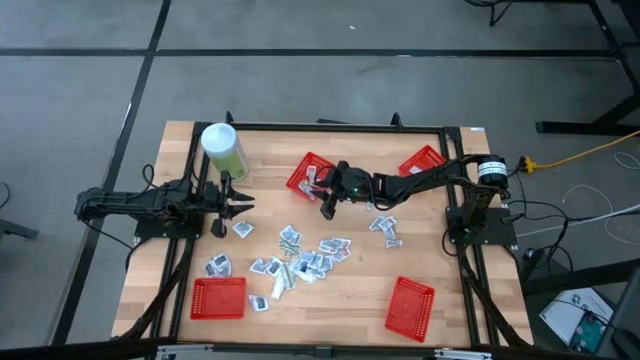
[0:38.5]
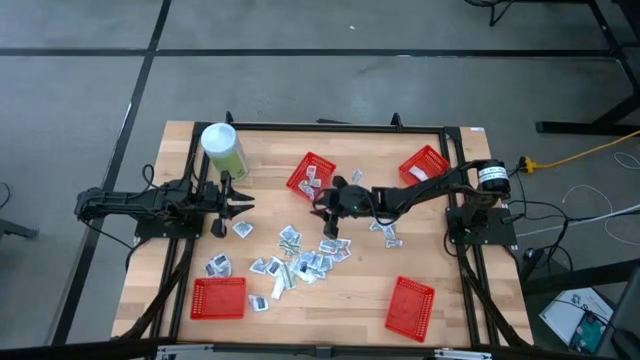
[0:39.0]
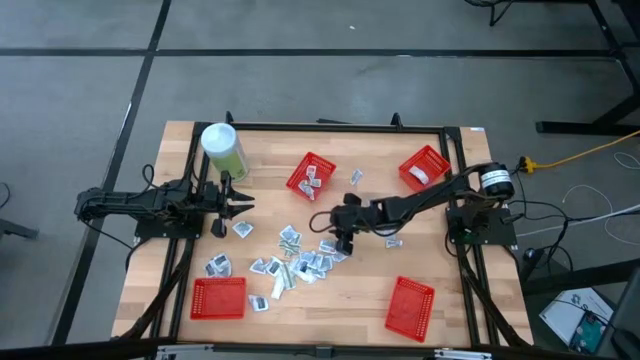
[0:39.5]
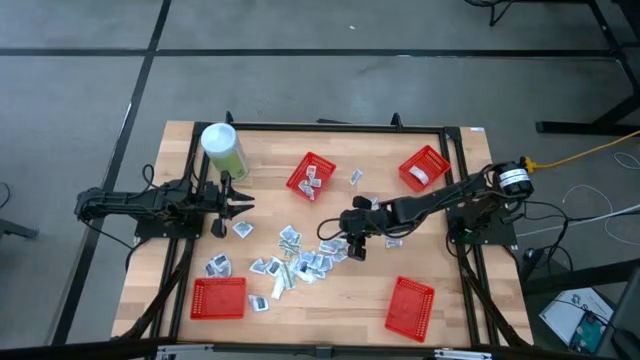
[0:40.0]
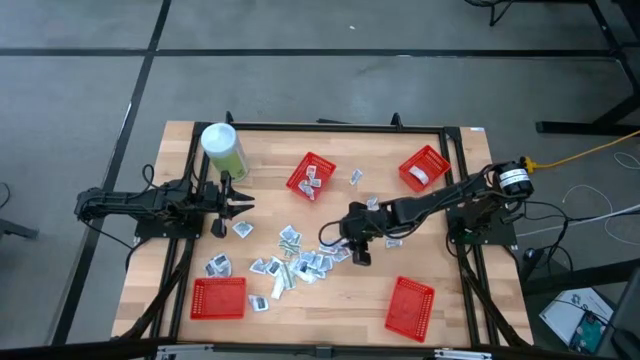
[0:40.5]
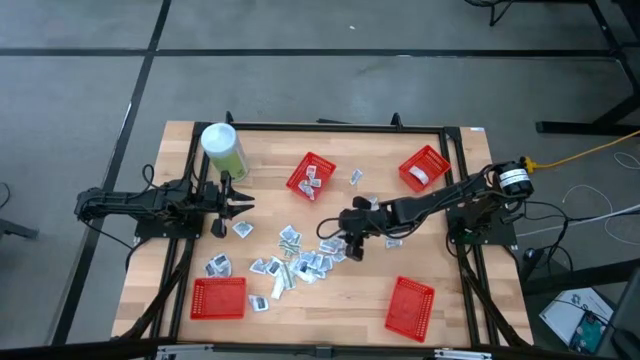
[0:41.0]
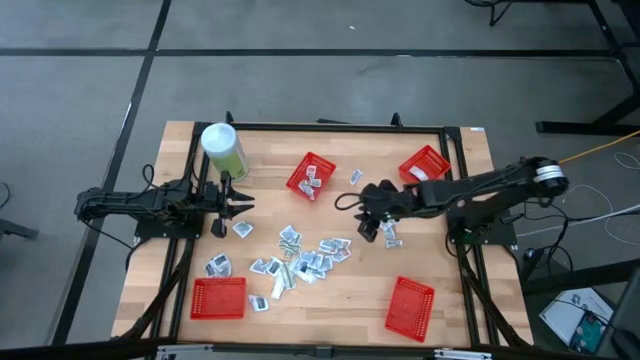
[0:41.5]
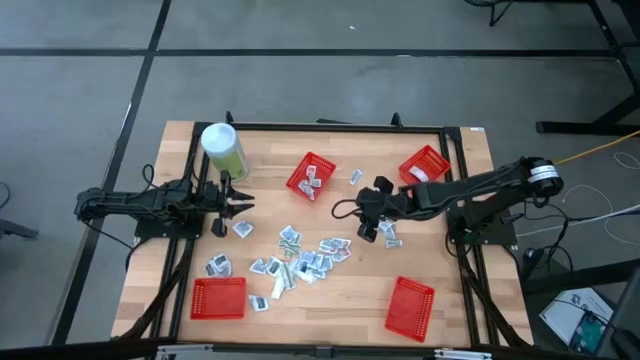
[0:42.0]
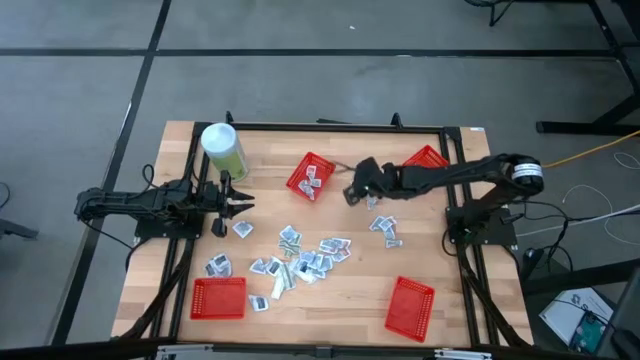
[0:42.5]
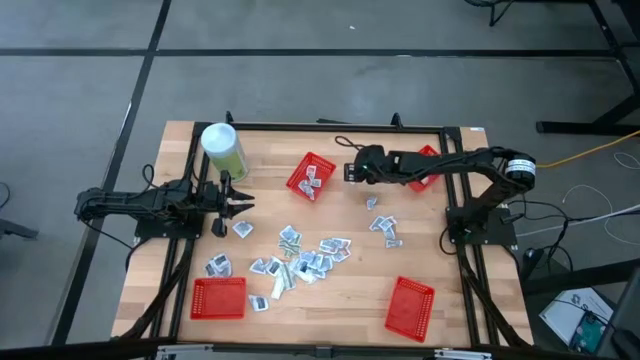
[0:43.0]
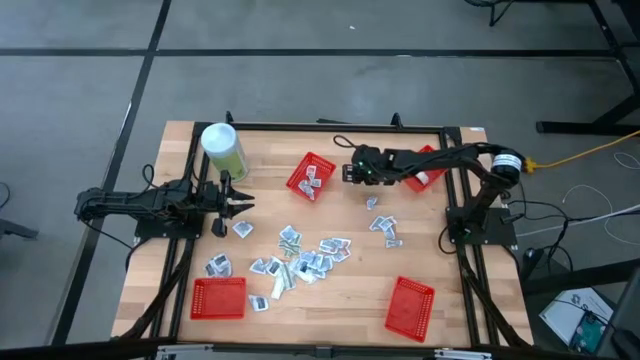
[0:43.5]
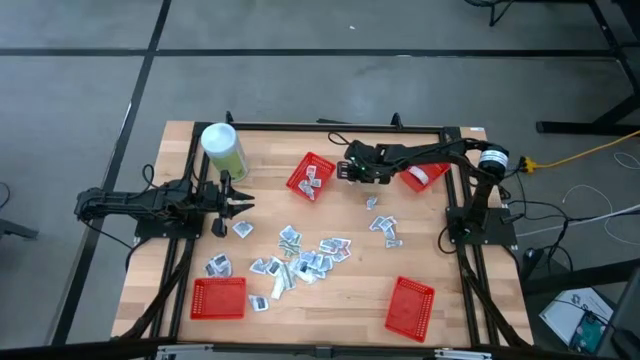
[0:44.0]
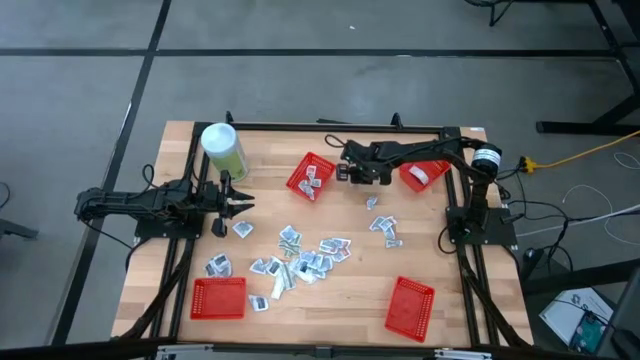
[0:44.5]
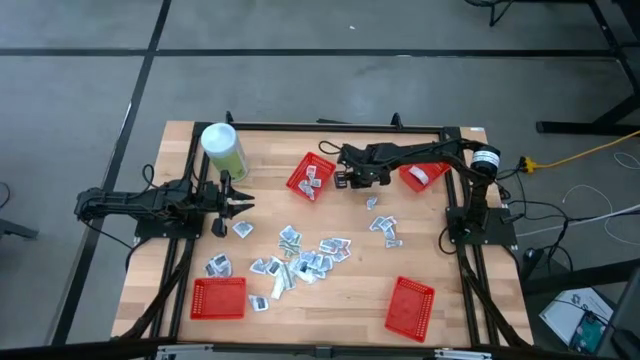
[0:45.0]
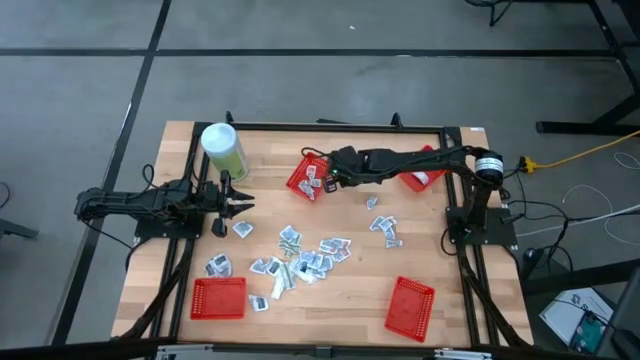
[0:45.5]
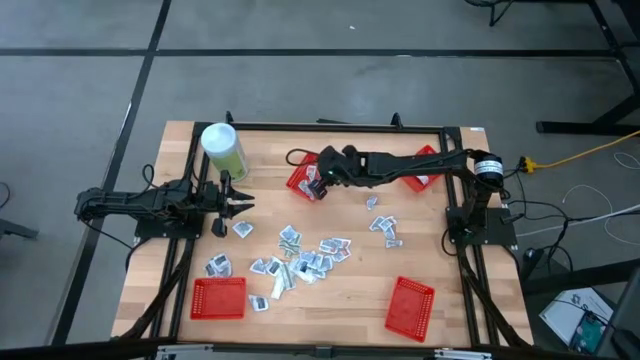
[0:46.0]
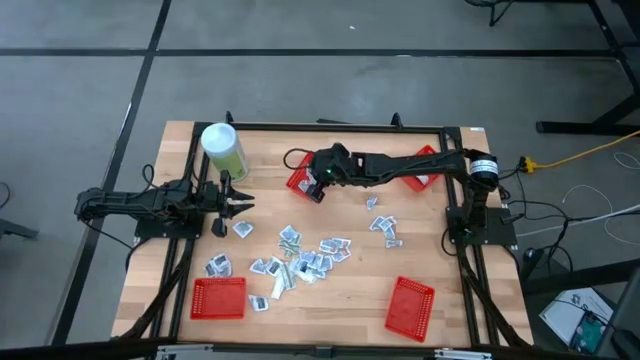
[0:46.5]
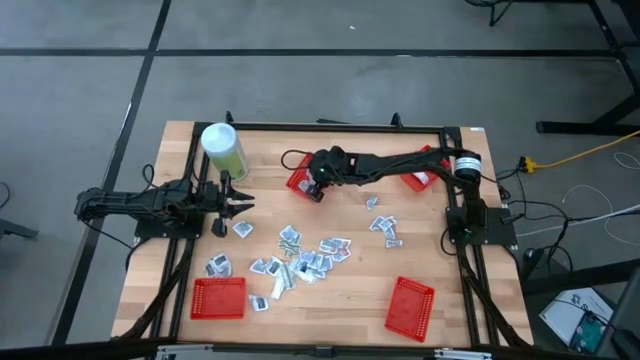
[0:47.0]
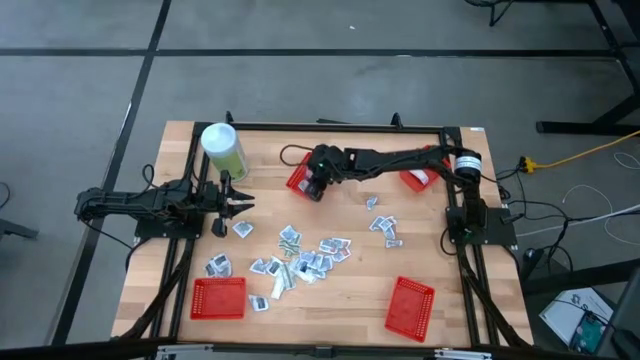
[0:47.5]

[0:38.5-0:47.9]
Task: Pick & Place First Aid Supplies
Put the orange ointment pack into the red container

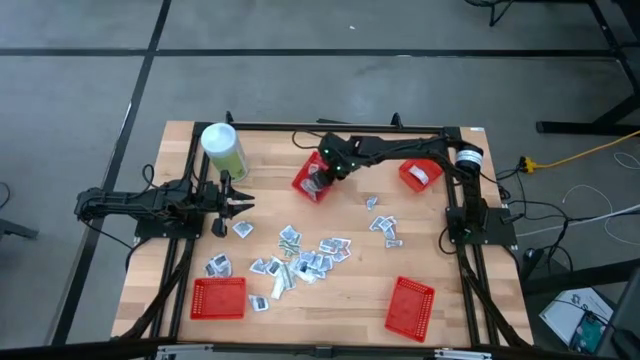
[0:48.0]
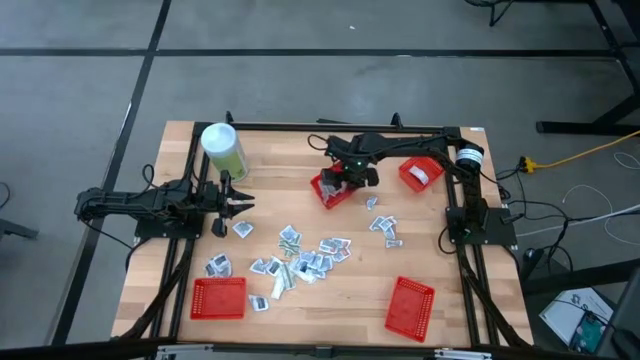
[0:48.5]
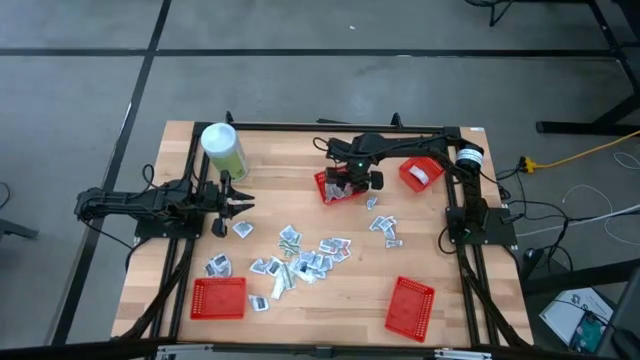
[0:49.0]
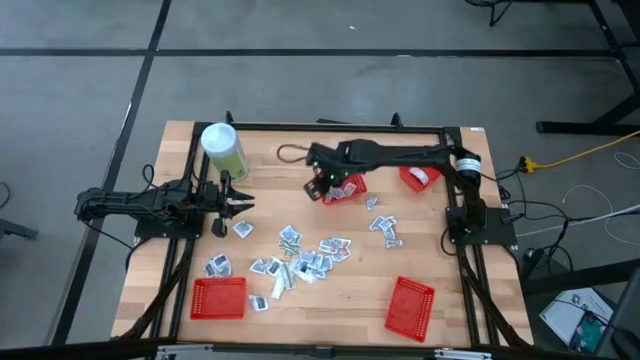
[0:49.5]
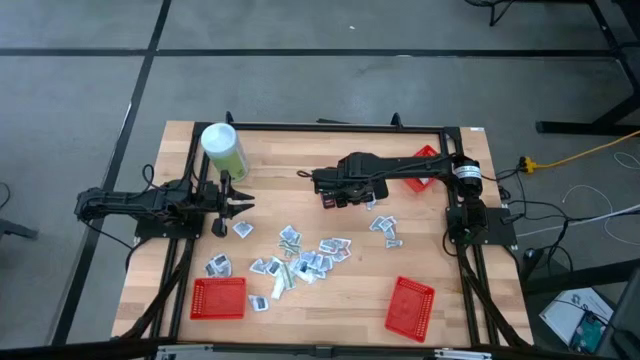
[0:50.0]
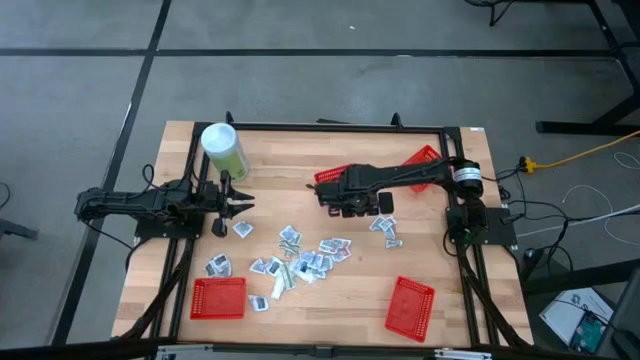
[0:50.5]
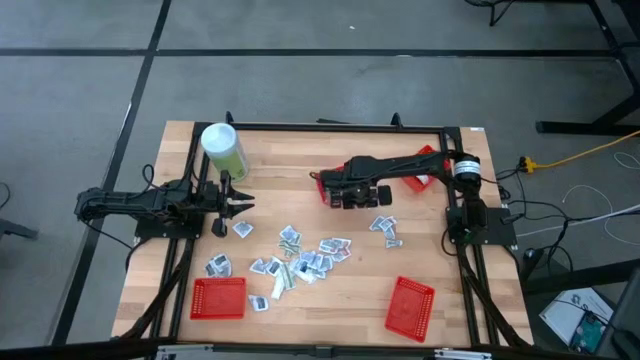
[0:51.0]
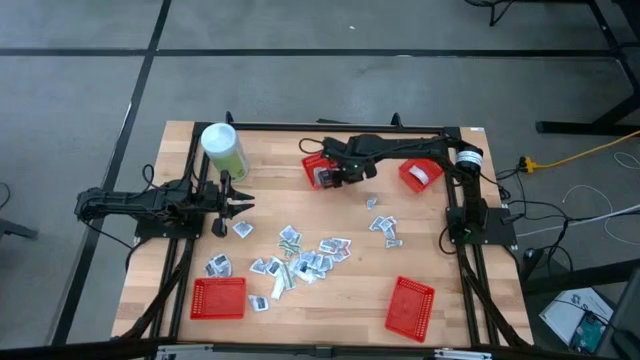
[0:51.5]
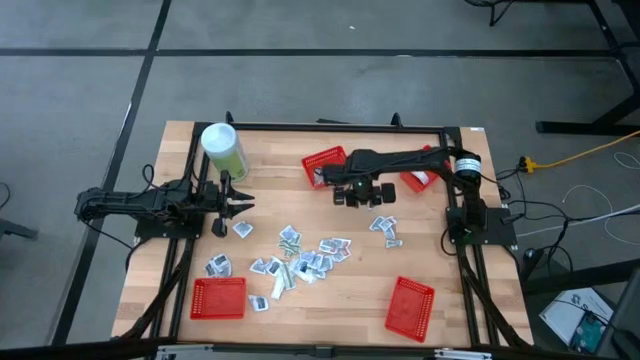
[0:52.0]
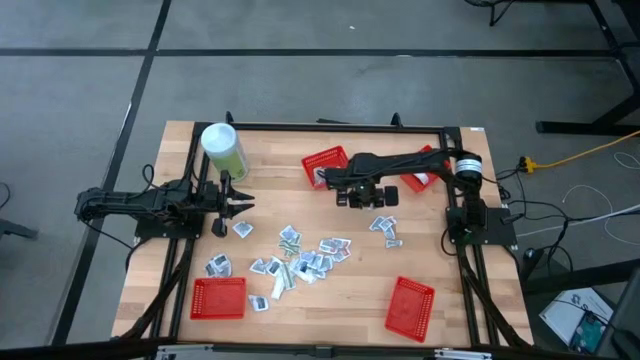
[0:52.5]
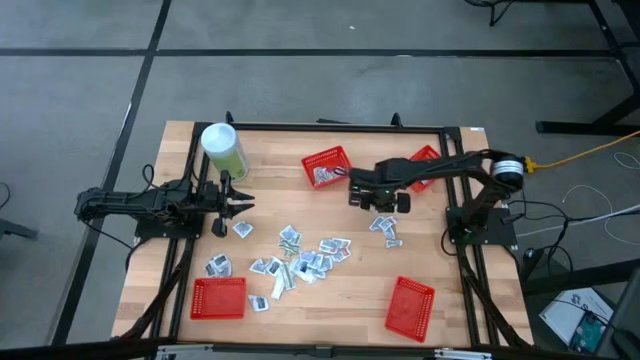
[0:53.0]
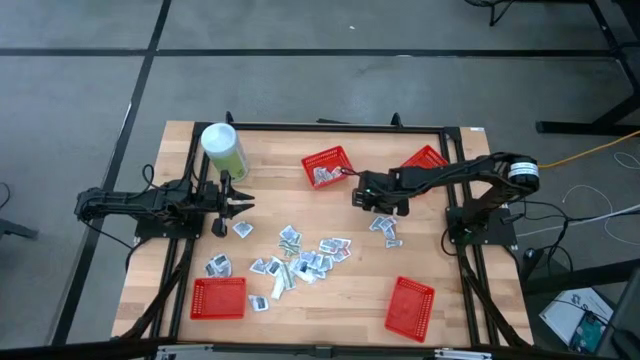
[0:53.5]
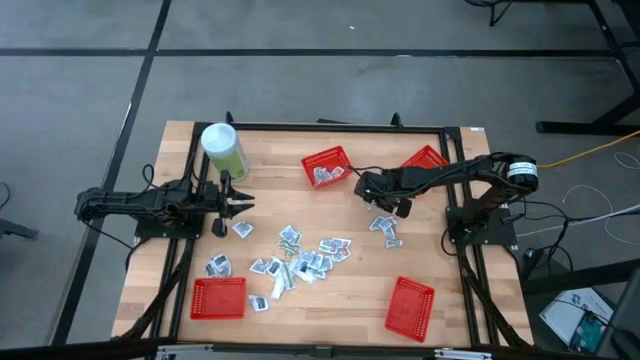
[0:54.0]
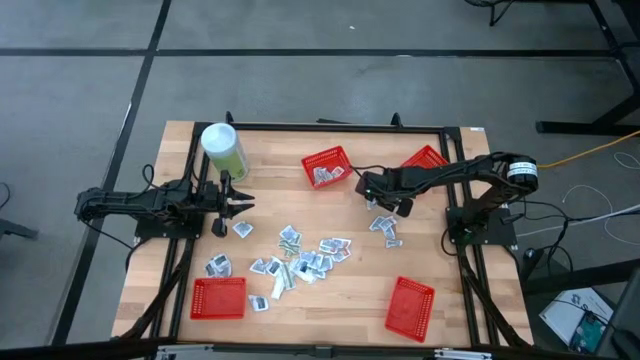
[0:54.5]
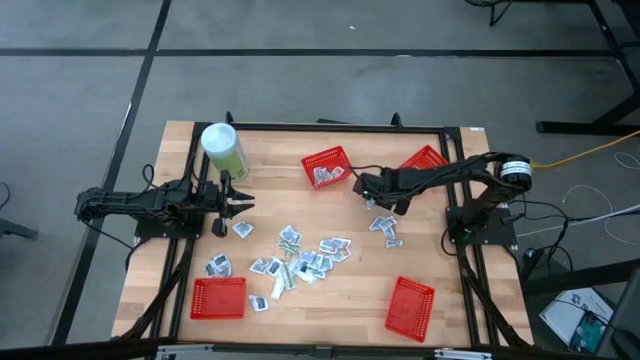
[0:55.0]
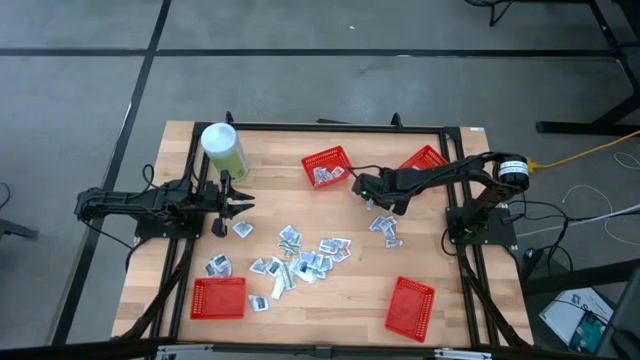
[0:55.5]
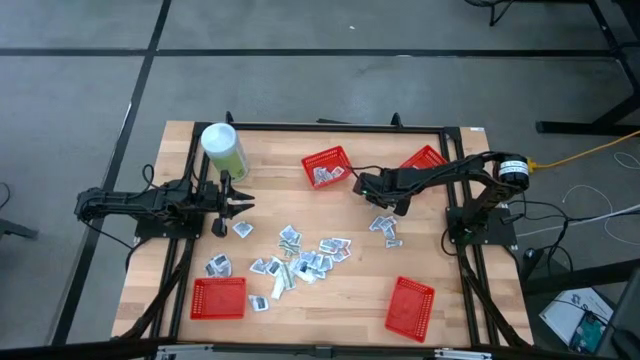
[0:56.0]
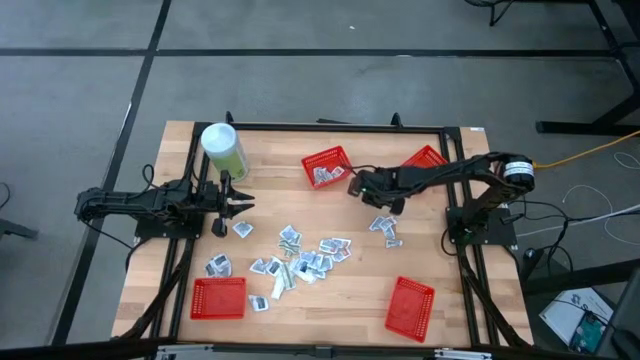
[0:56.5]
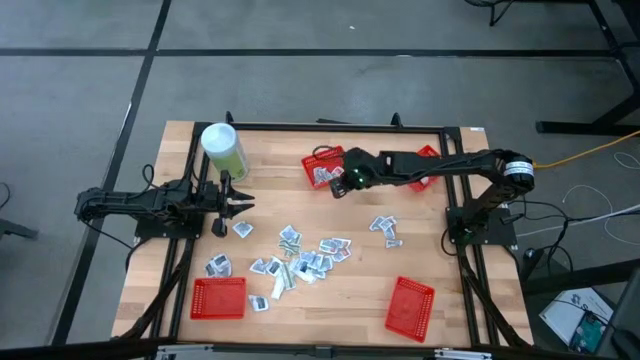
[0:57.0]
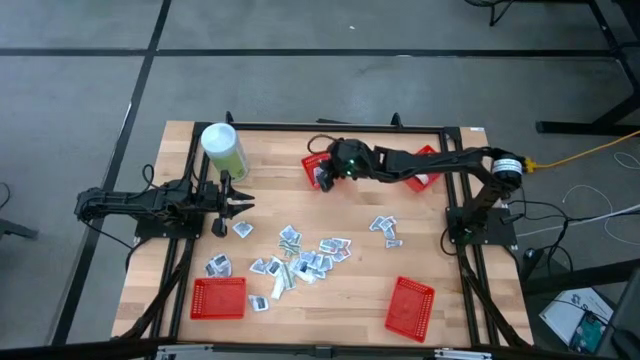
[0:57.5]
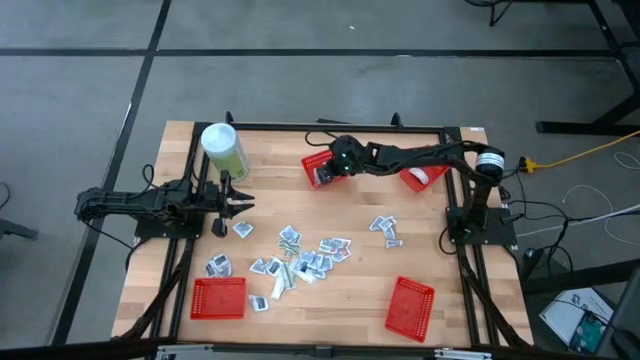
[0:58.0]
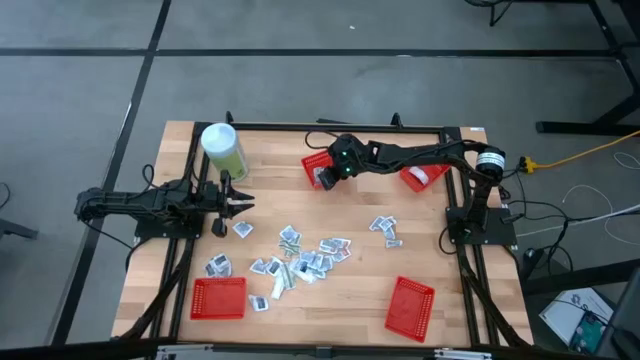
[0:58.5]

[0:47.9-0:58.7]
Put the orange ointment pack into the red container

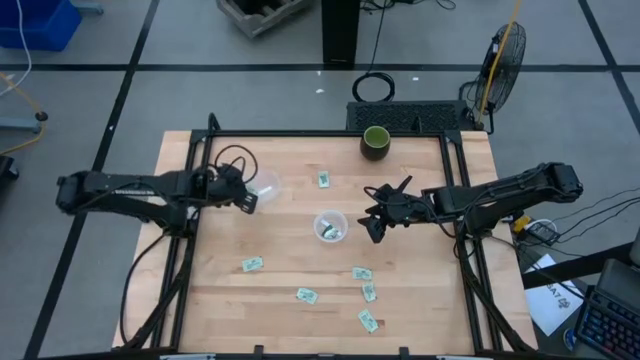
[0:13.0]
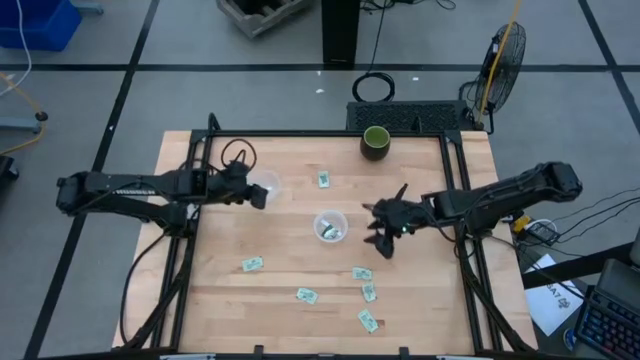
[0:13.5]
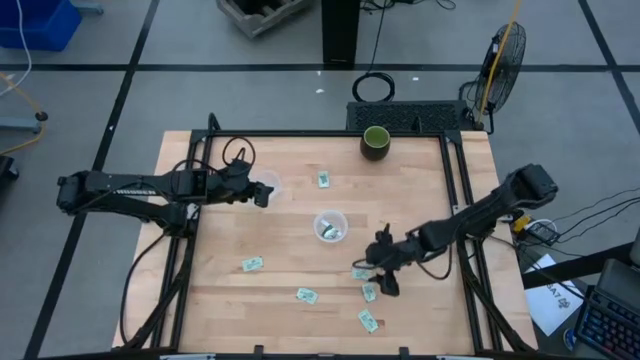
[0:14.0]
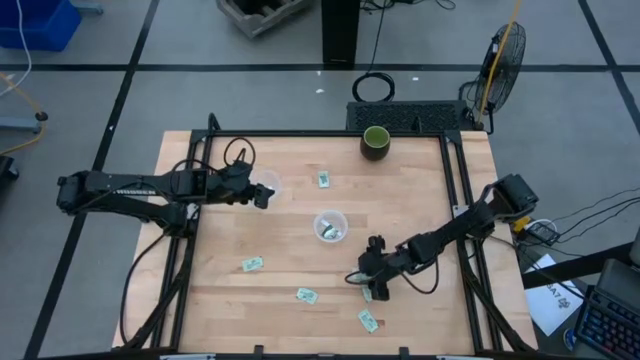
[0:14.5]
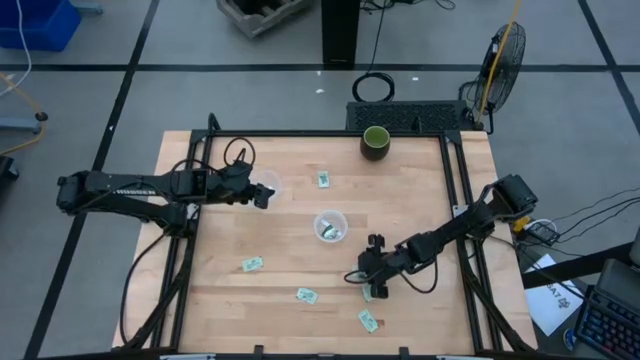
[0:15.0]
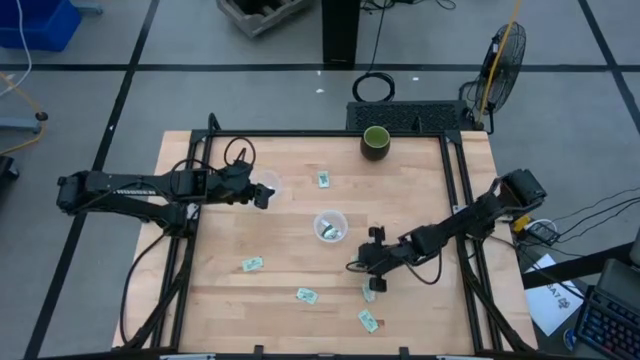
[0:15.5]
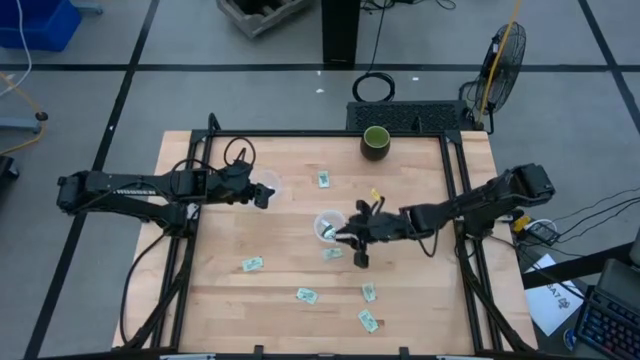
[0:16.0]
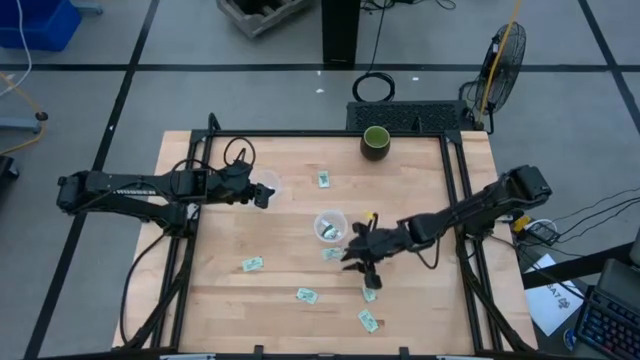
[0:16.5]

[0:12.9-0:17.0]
Task: Pick and place items into bin
Put the stevia packet into the right transparent bin
